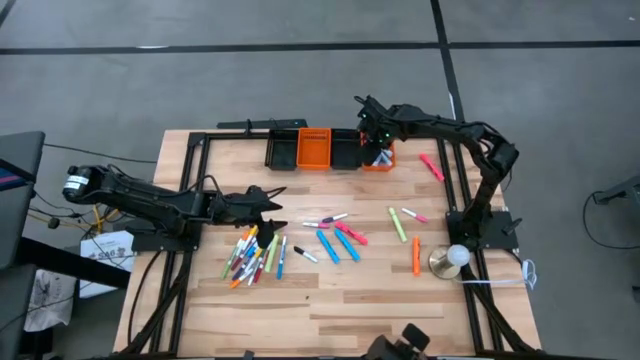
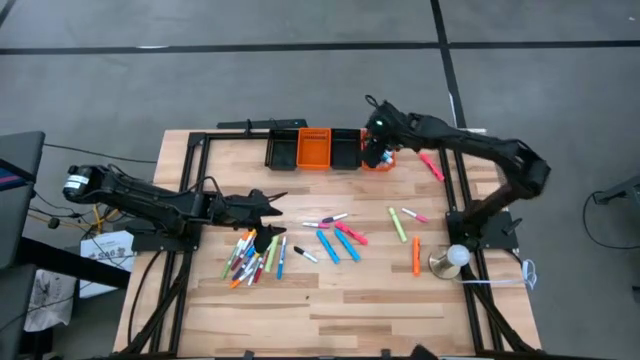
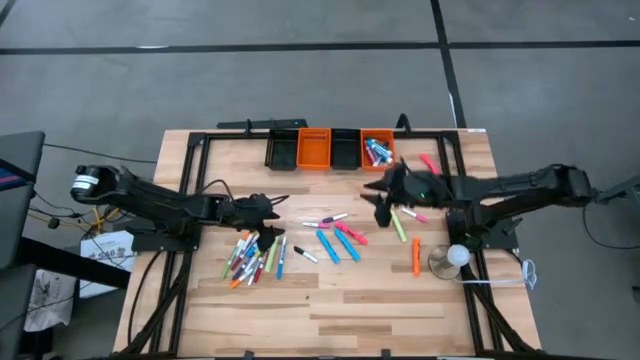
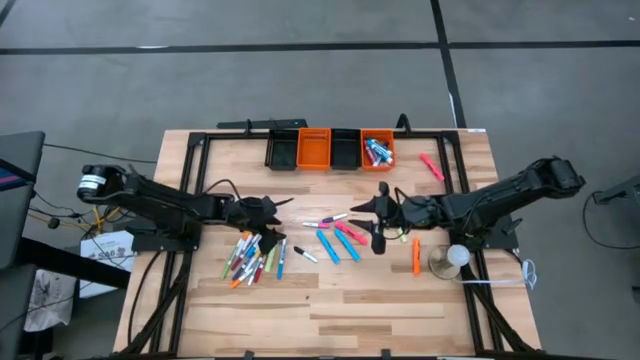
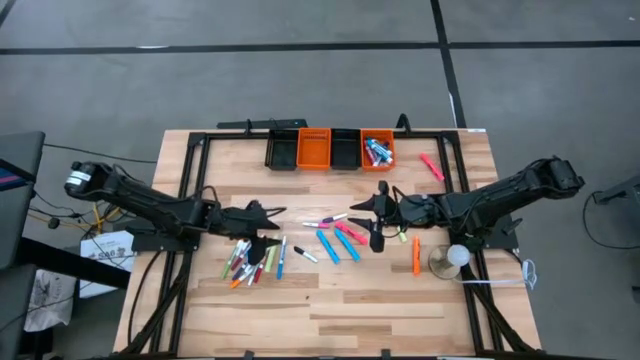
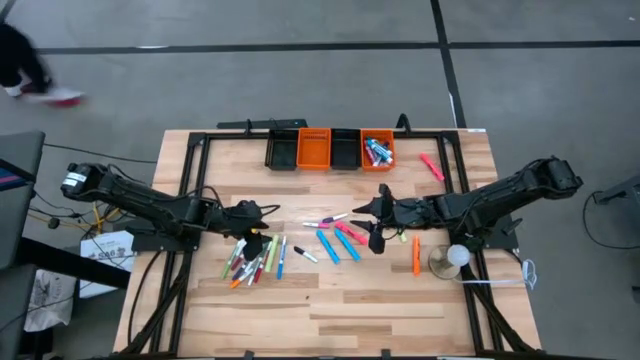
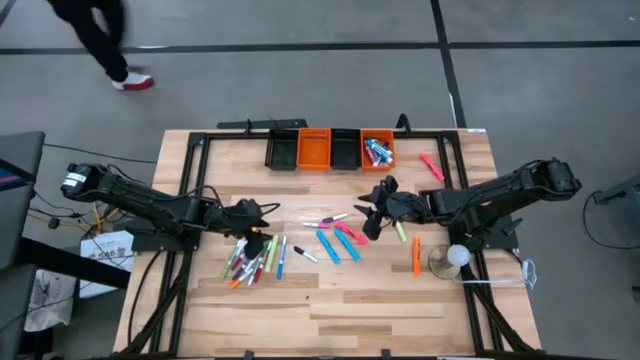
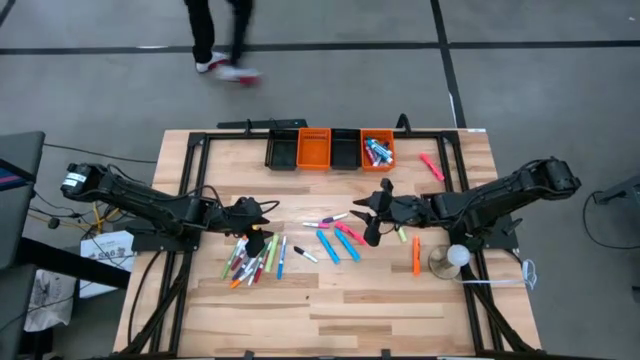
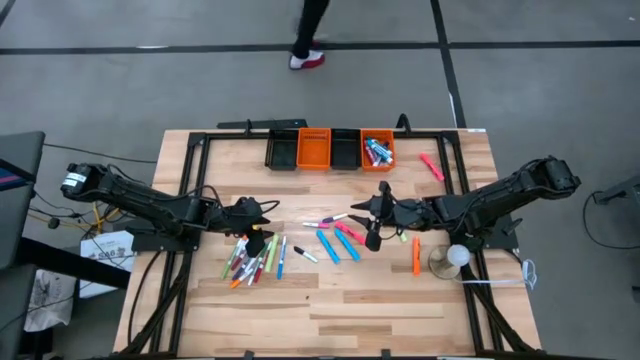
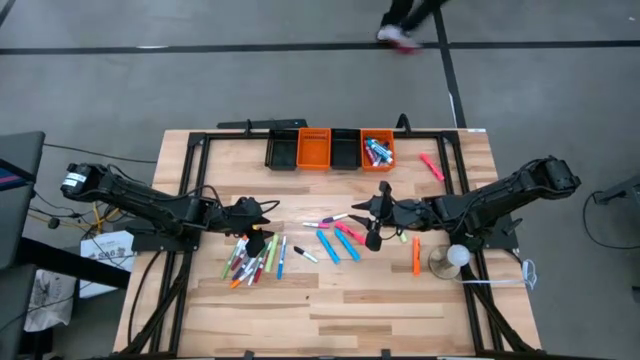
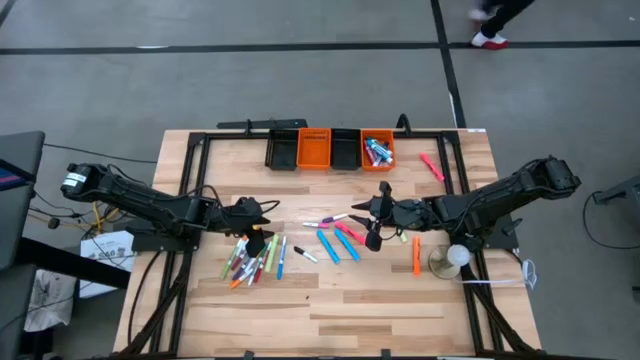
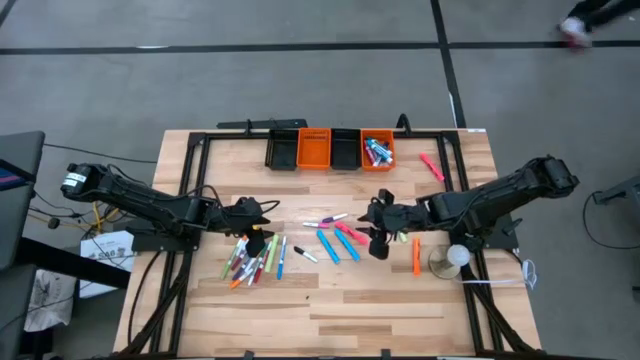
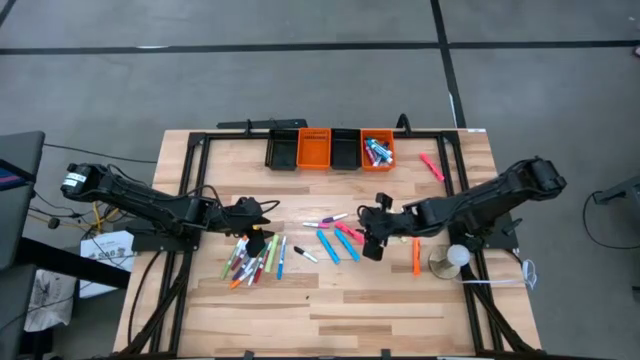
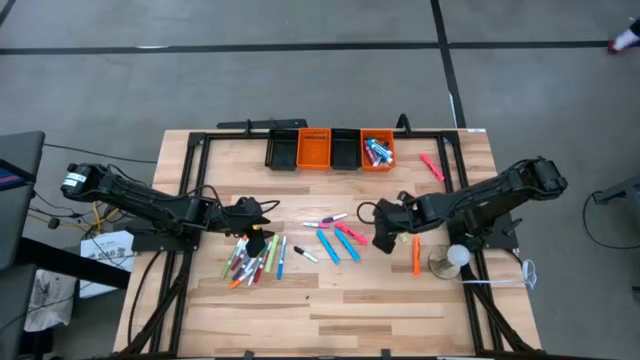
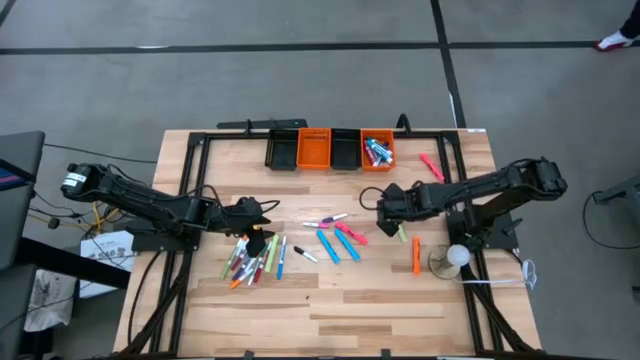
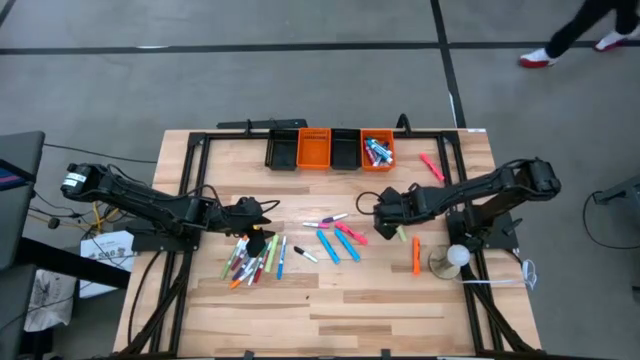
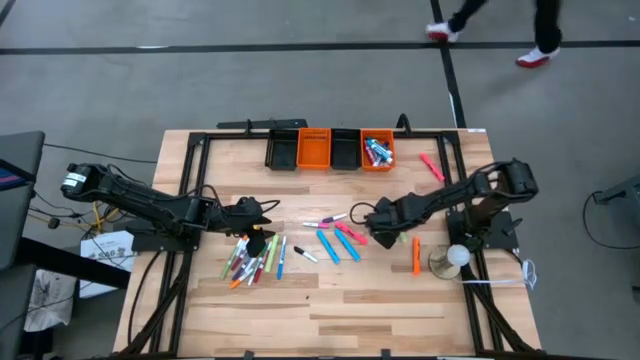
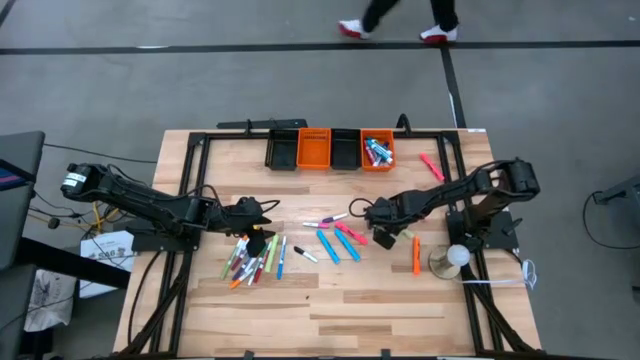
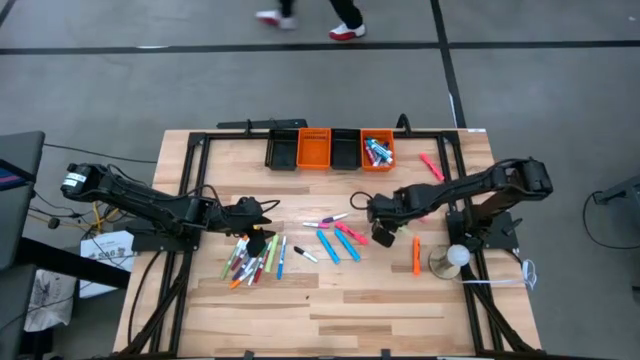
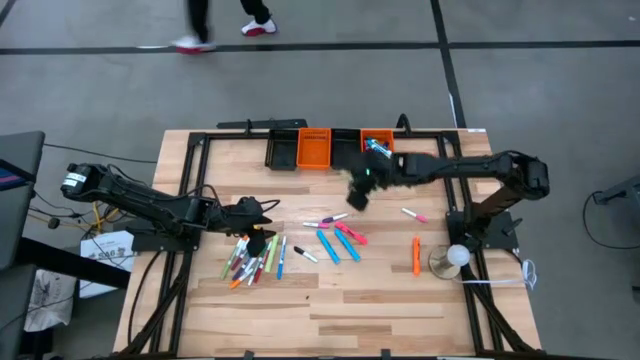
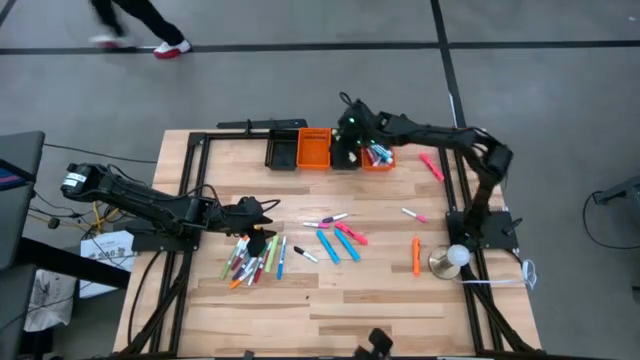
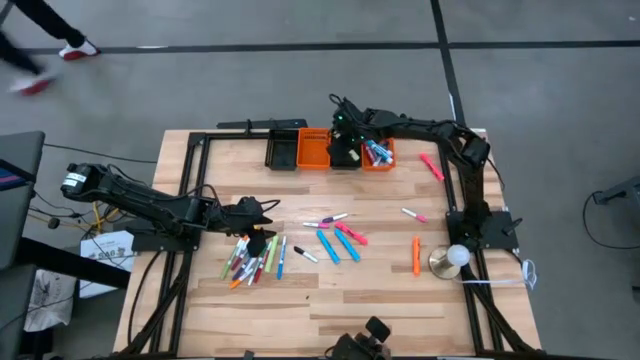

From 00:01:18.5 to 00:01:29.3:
Task: Pick & Place Markers
Put the light green highlighter pen into the right black bin

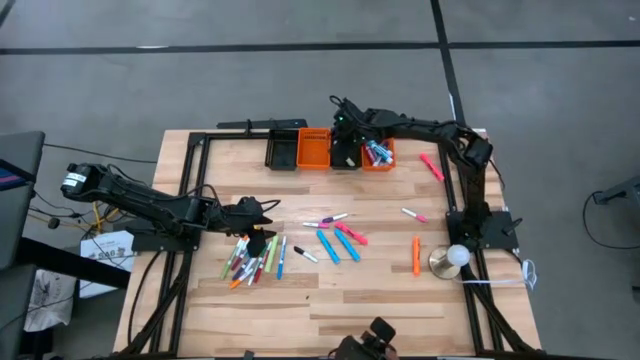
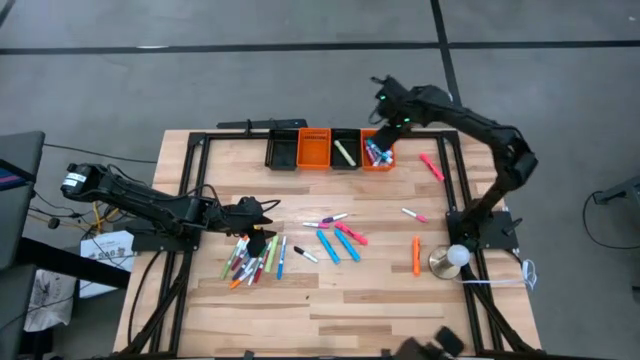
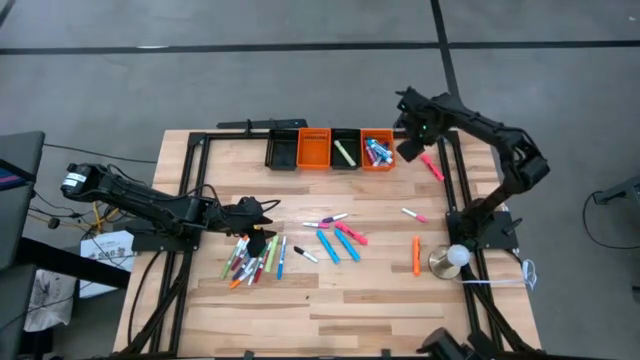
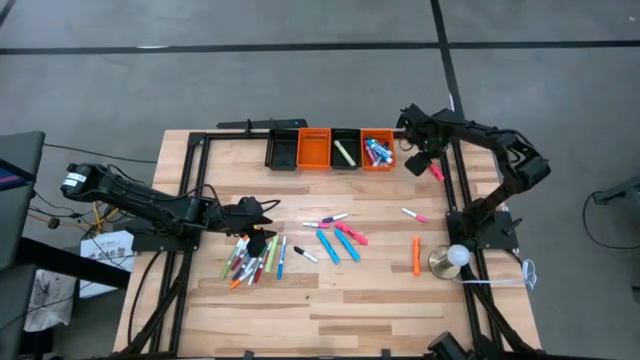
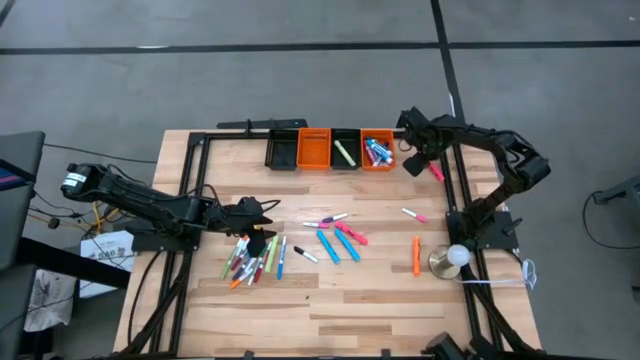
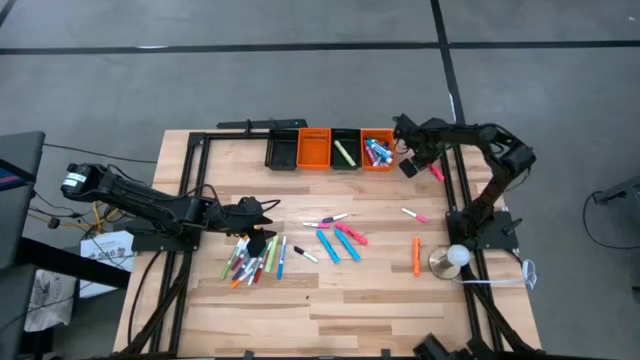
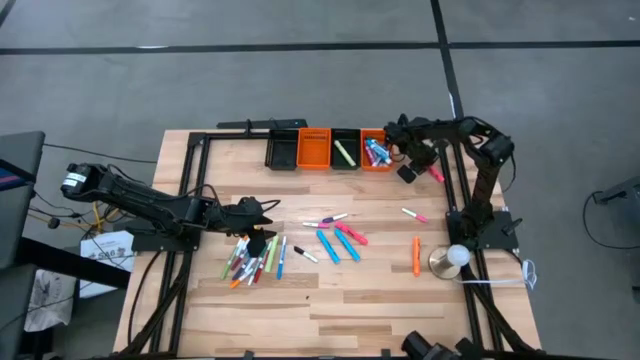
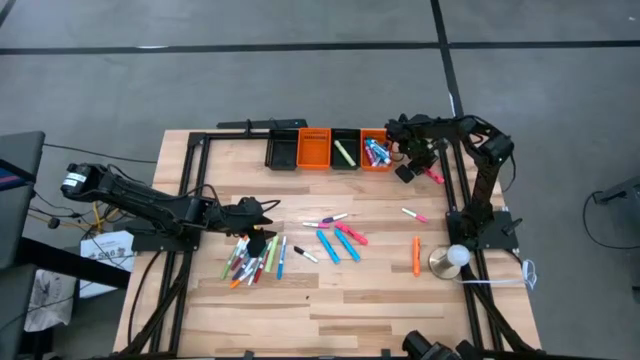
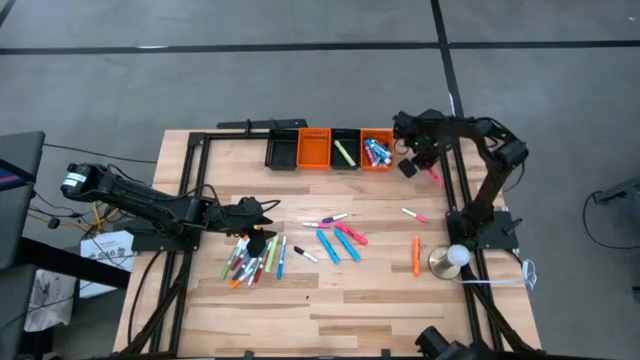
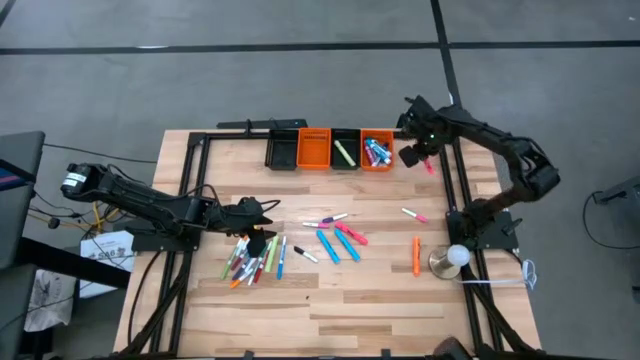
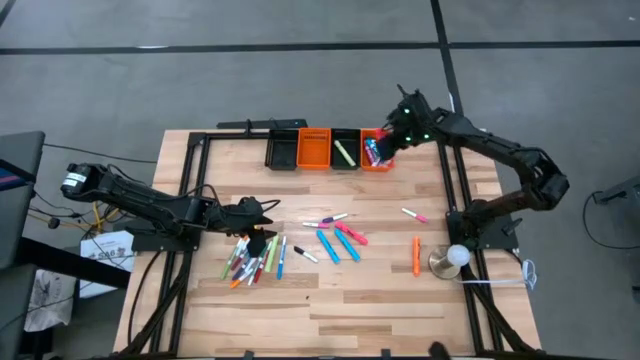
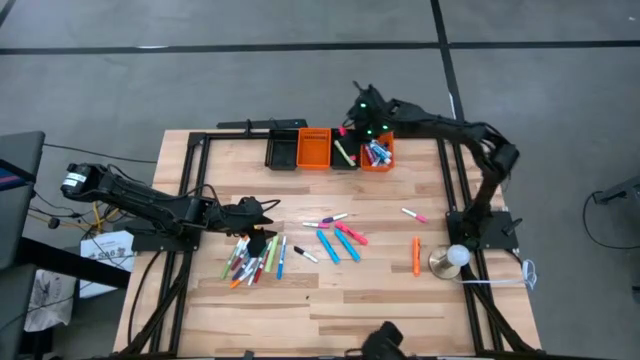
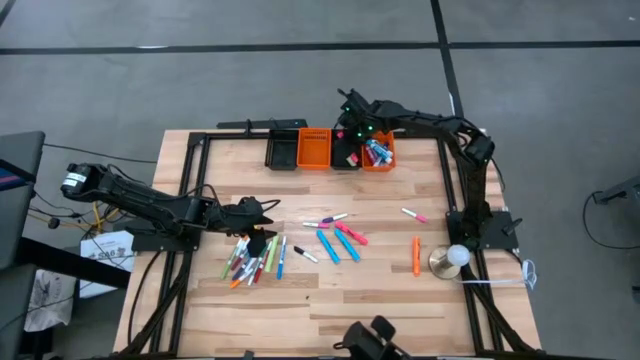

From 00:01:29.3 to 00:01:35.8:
Put the pink highlighter pen into the right black bin

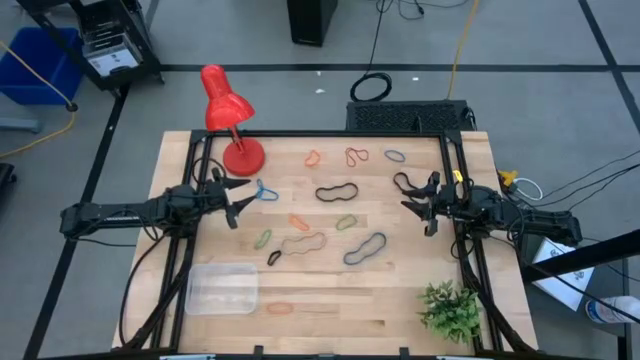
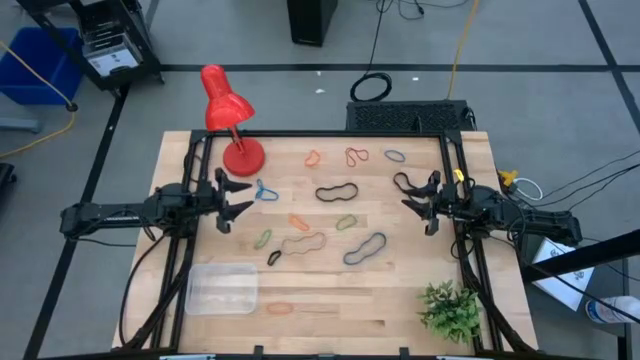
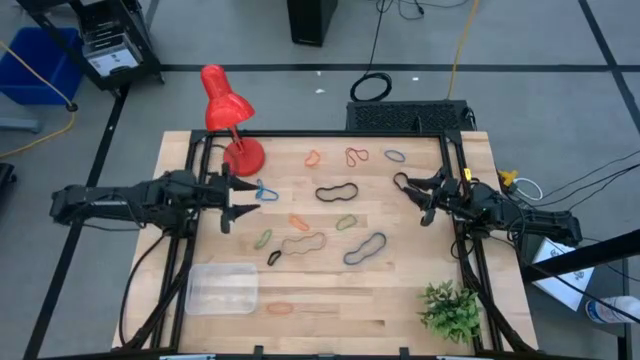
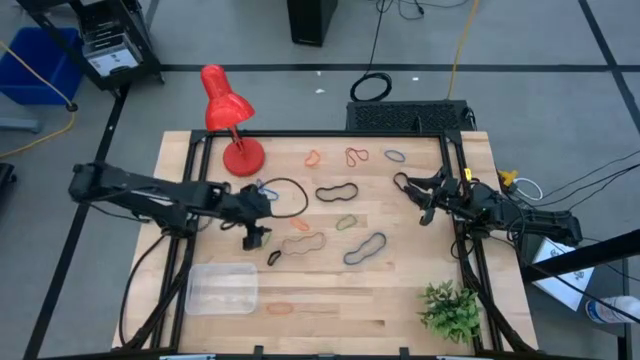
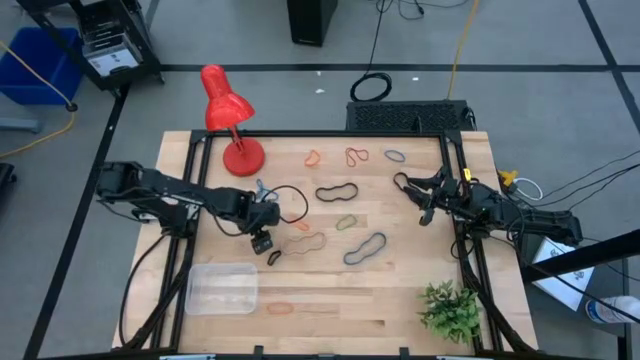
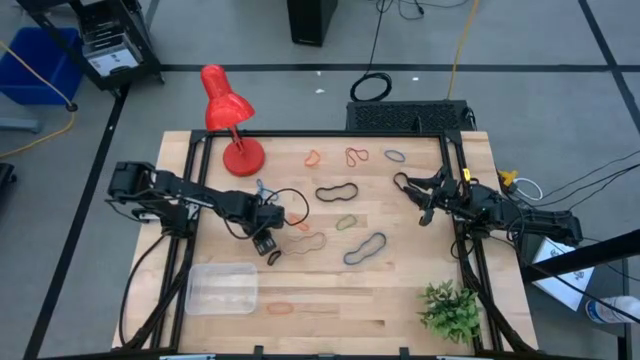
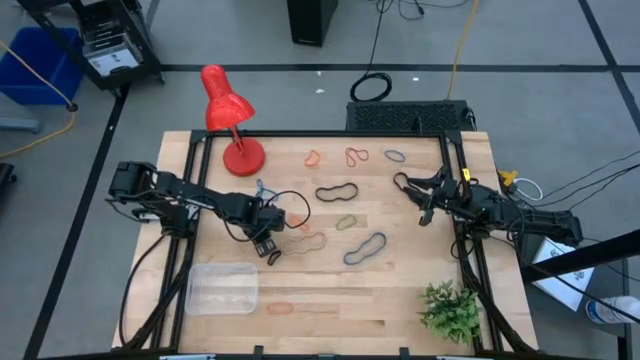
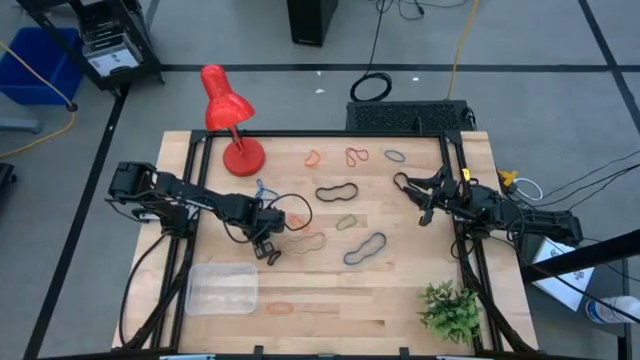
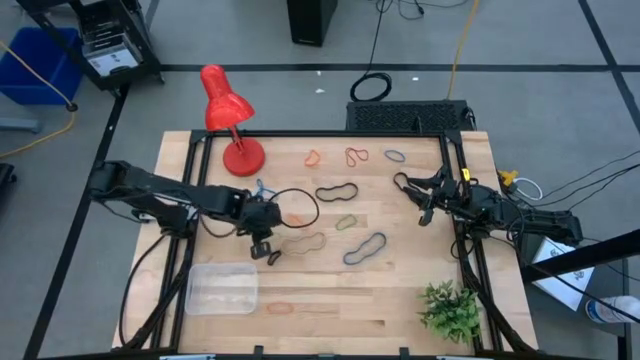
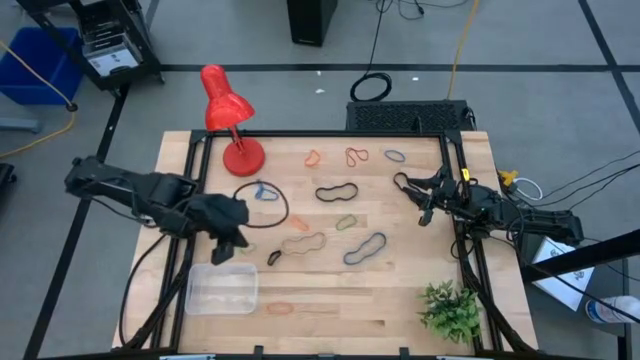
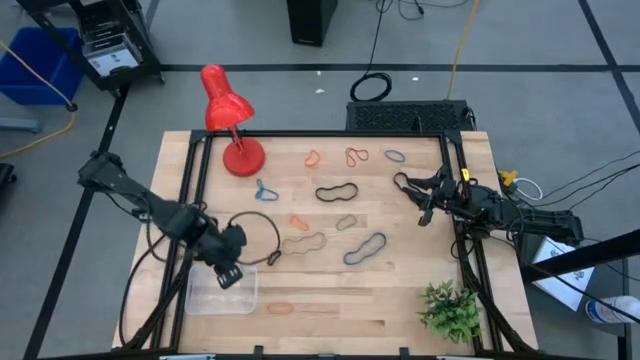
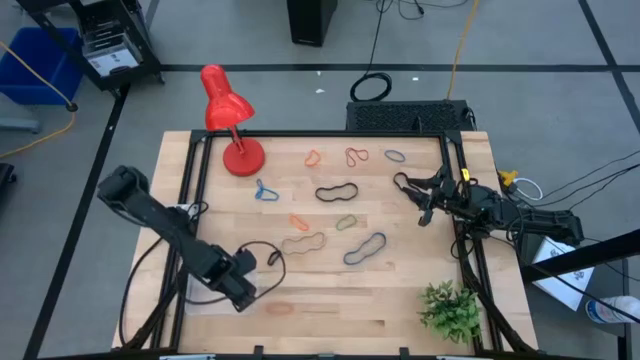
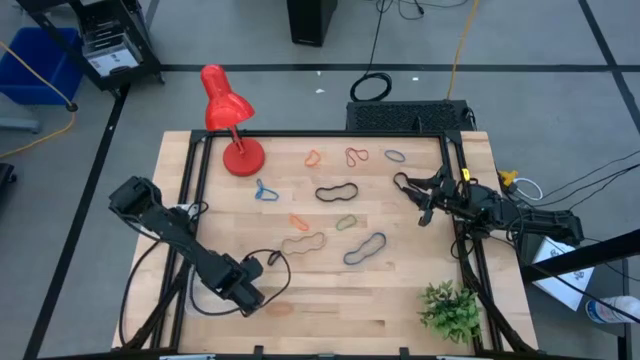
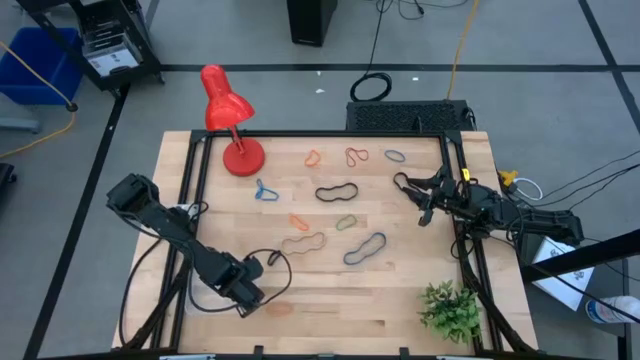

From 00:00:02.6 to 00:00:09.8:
Task: Pick and place rubber bands into bin
Put the left green rubber band into the transparent bin
